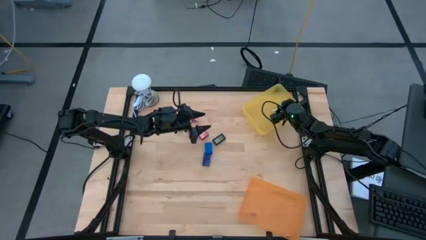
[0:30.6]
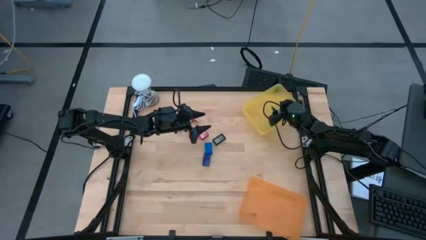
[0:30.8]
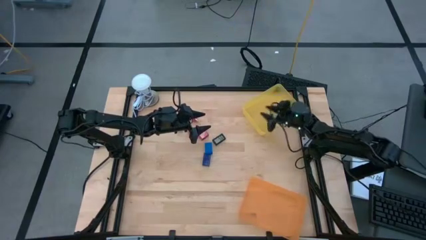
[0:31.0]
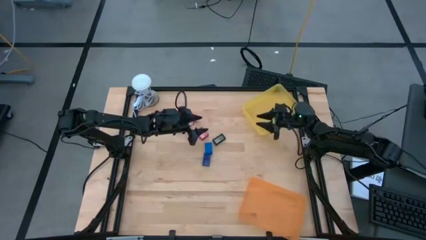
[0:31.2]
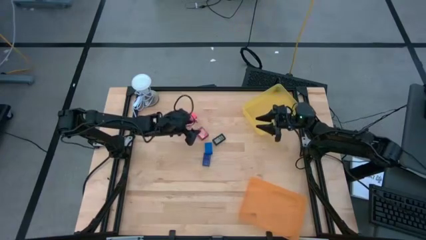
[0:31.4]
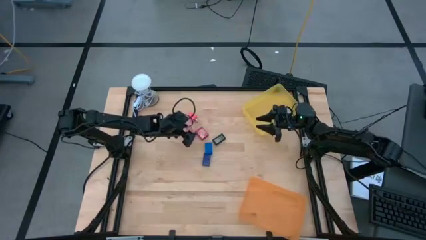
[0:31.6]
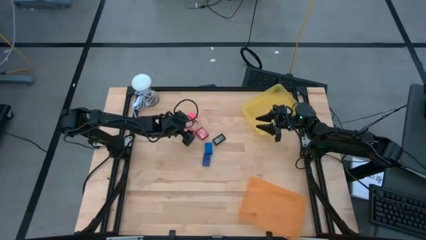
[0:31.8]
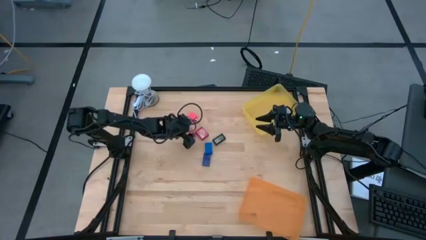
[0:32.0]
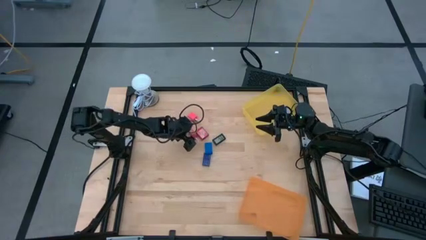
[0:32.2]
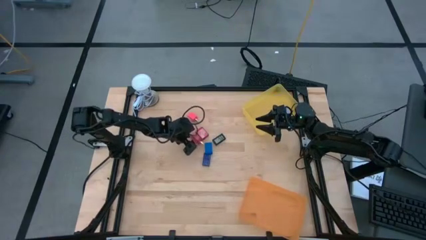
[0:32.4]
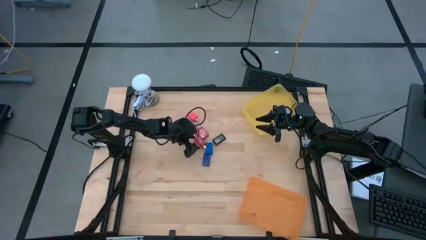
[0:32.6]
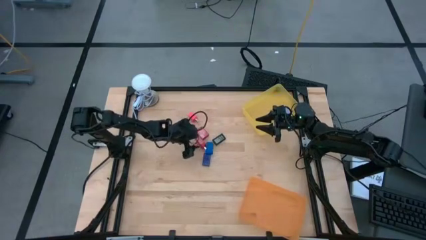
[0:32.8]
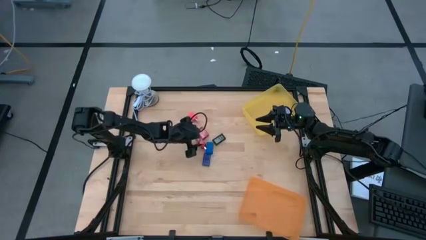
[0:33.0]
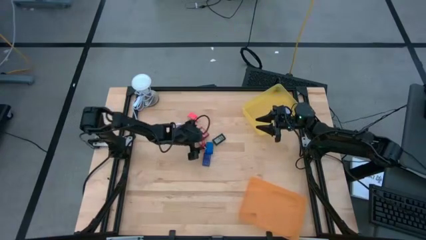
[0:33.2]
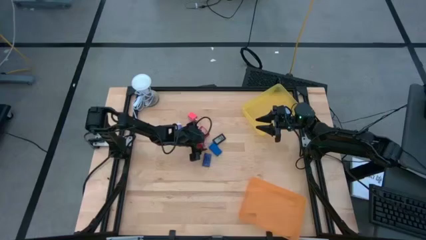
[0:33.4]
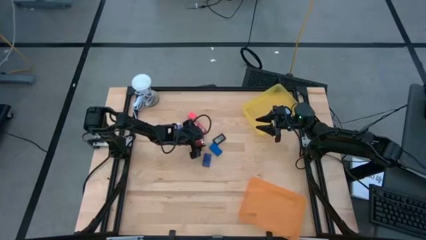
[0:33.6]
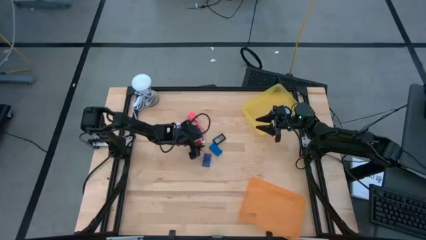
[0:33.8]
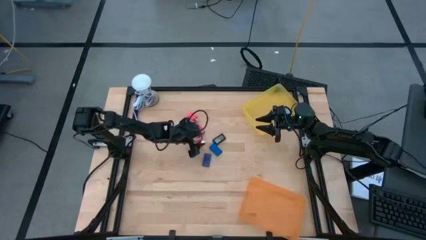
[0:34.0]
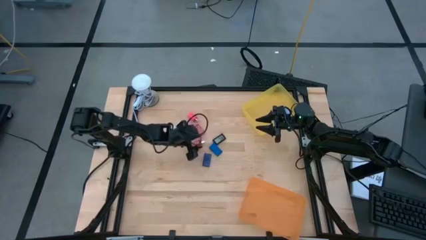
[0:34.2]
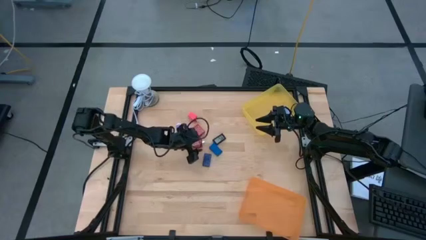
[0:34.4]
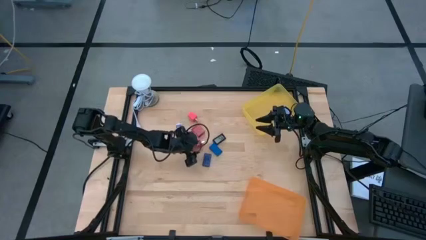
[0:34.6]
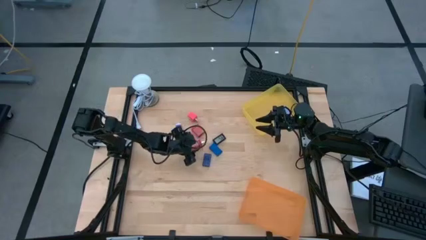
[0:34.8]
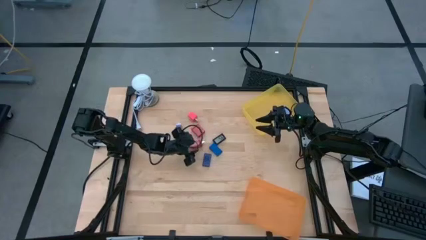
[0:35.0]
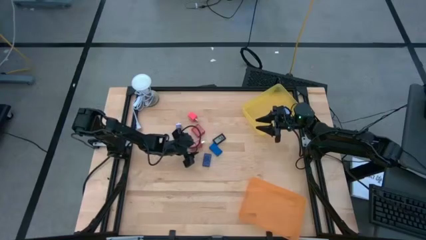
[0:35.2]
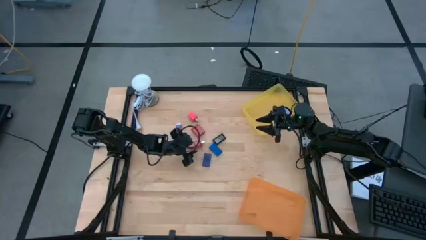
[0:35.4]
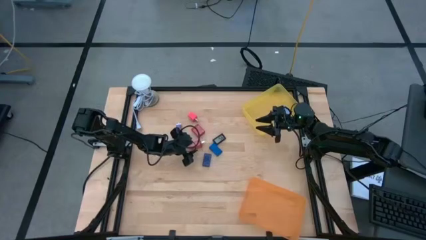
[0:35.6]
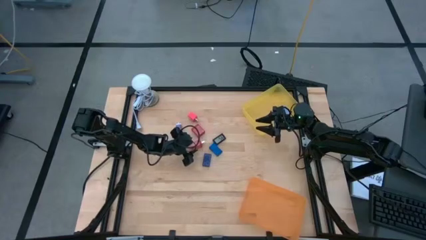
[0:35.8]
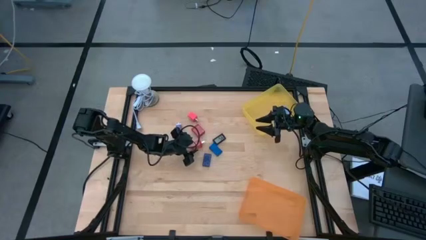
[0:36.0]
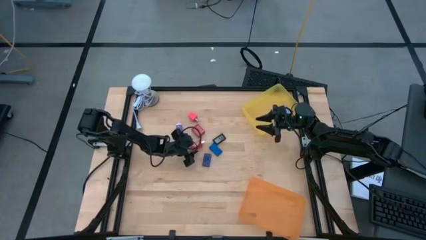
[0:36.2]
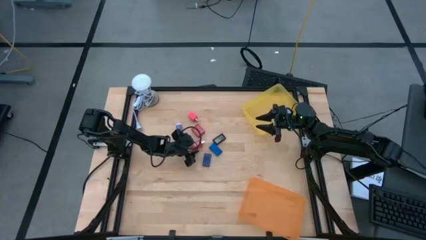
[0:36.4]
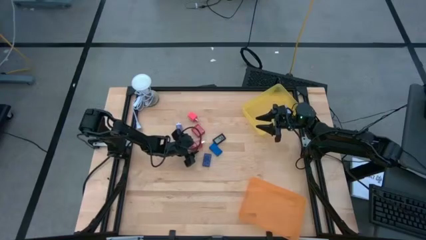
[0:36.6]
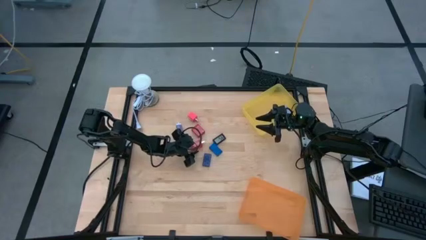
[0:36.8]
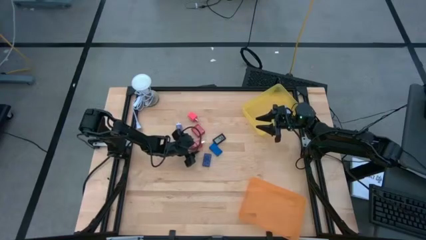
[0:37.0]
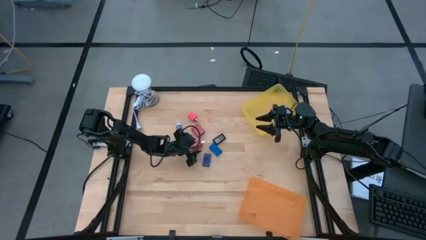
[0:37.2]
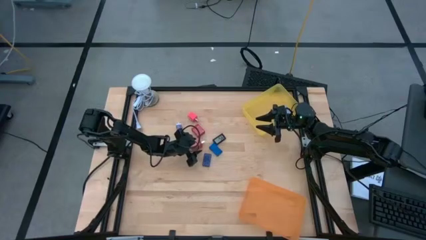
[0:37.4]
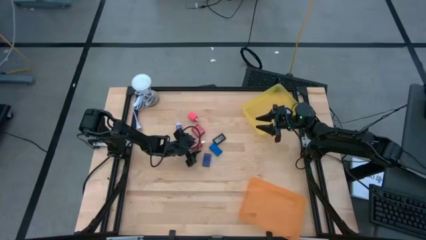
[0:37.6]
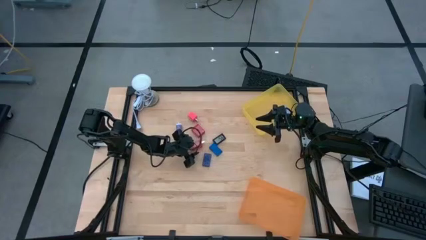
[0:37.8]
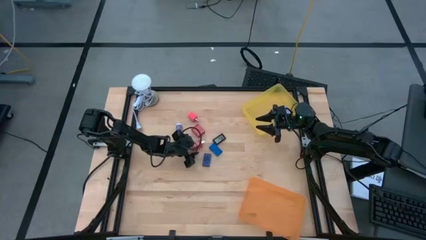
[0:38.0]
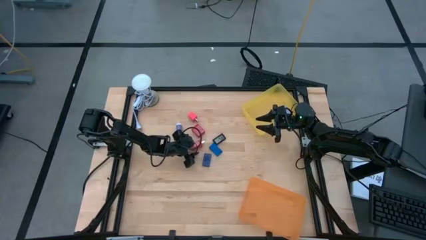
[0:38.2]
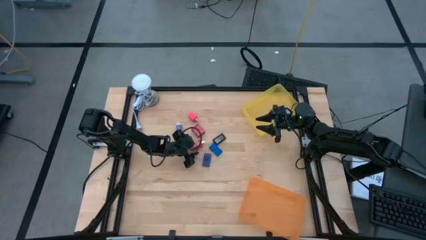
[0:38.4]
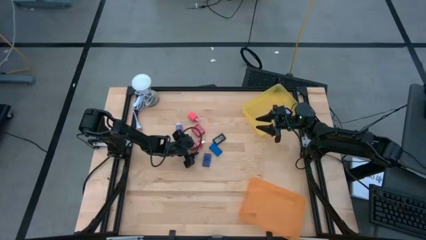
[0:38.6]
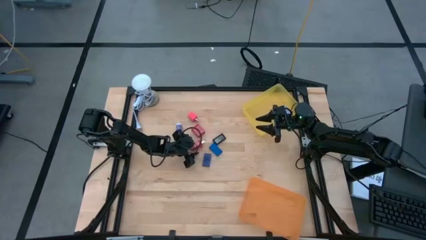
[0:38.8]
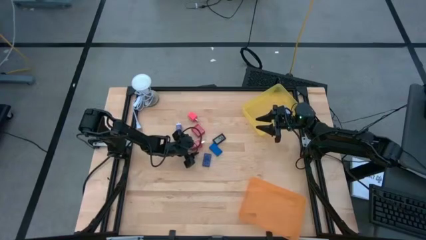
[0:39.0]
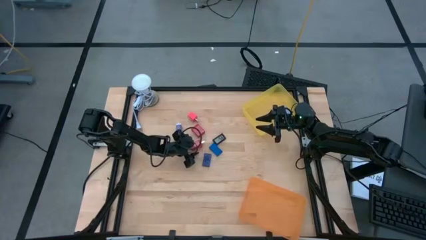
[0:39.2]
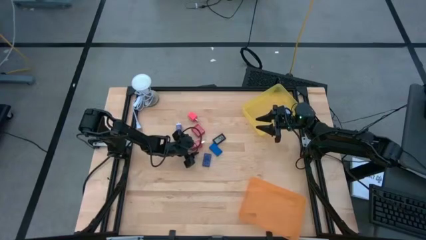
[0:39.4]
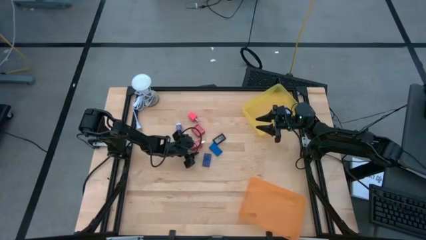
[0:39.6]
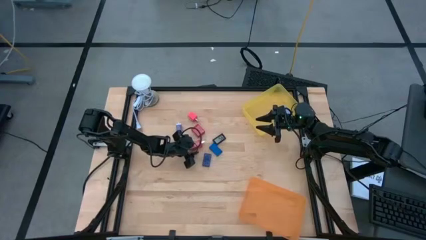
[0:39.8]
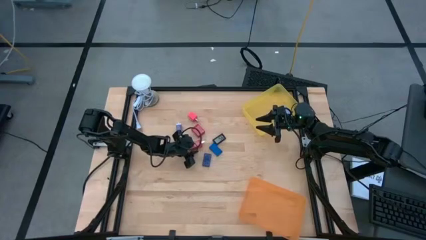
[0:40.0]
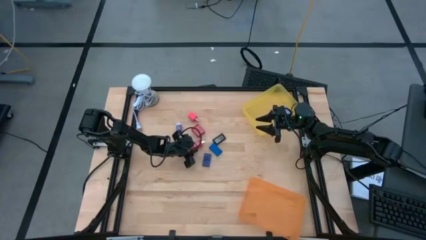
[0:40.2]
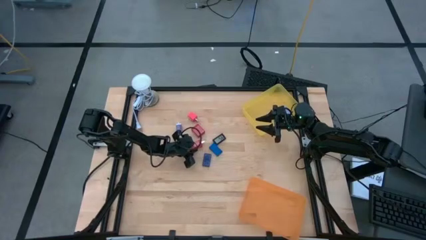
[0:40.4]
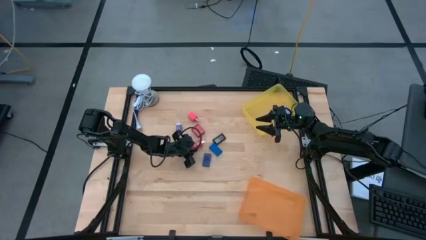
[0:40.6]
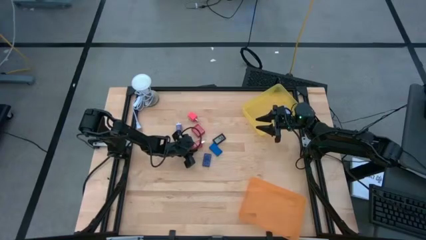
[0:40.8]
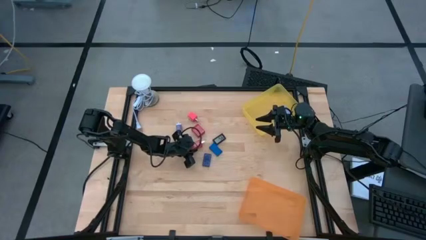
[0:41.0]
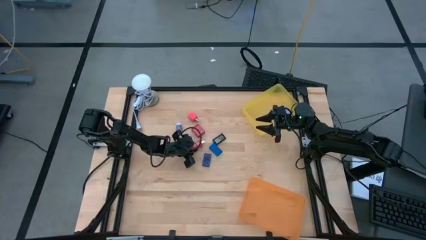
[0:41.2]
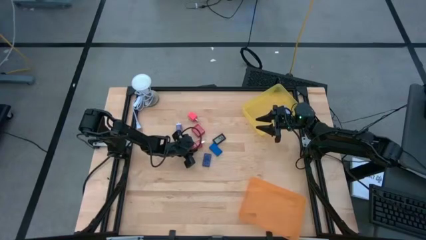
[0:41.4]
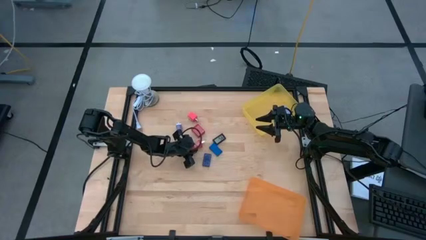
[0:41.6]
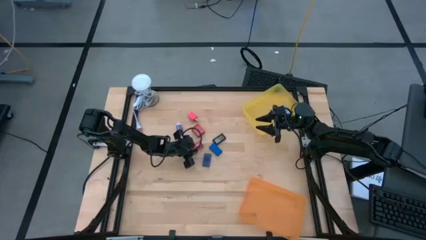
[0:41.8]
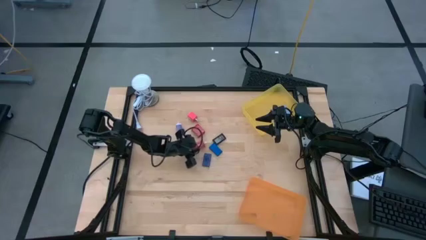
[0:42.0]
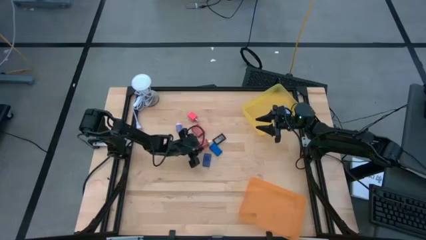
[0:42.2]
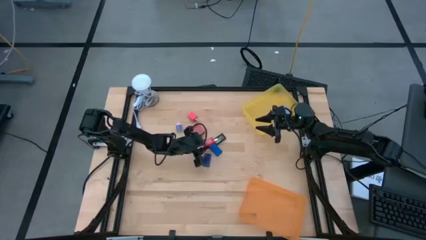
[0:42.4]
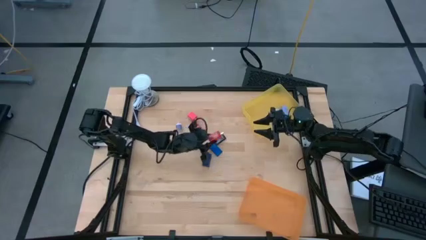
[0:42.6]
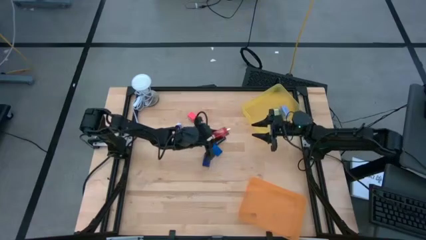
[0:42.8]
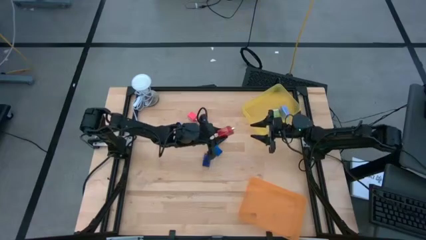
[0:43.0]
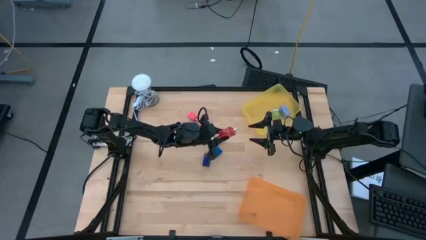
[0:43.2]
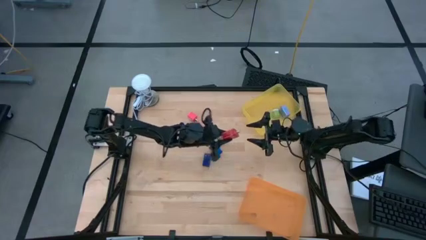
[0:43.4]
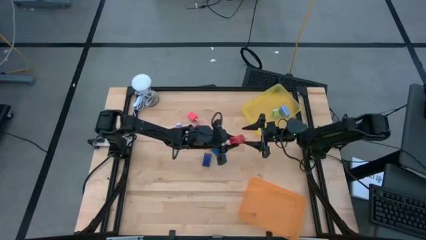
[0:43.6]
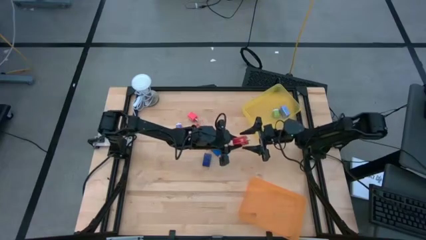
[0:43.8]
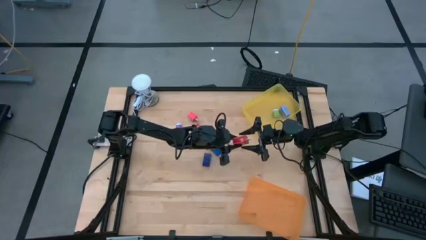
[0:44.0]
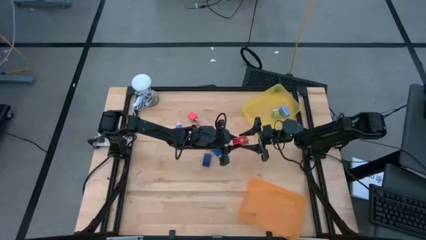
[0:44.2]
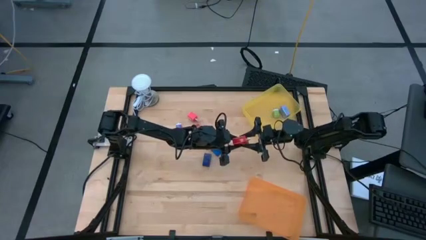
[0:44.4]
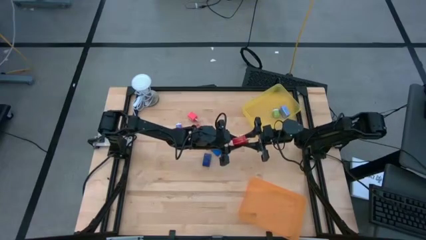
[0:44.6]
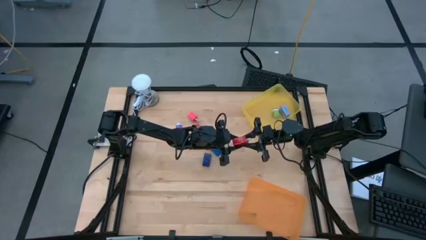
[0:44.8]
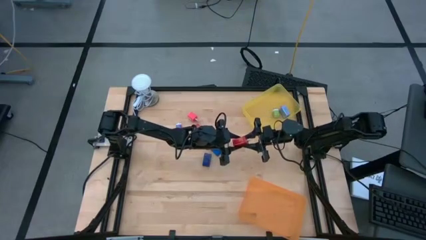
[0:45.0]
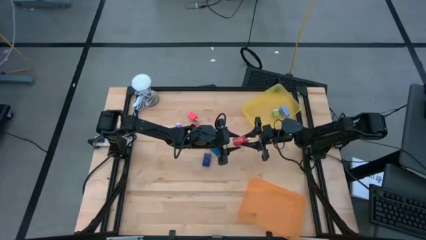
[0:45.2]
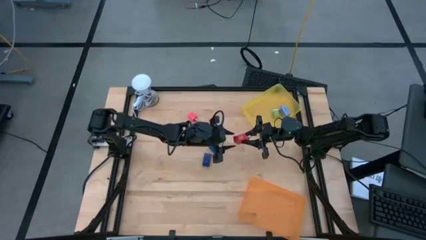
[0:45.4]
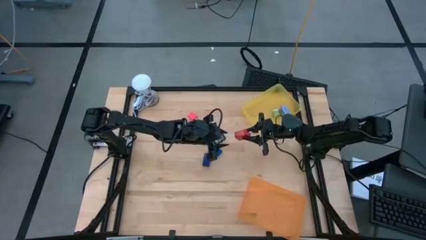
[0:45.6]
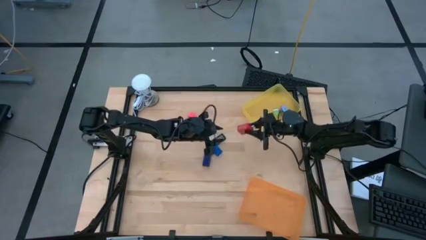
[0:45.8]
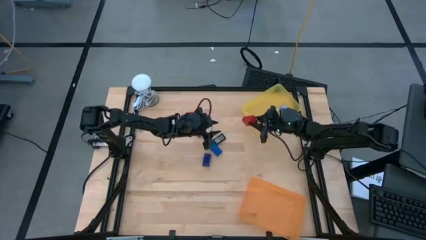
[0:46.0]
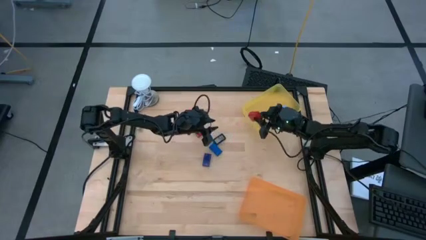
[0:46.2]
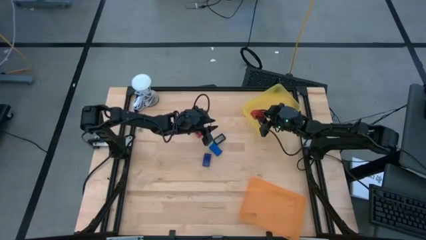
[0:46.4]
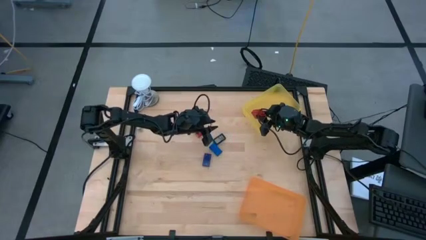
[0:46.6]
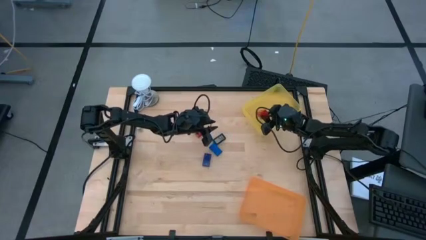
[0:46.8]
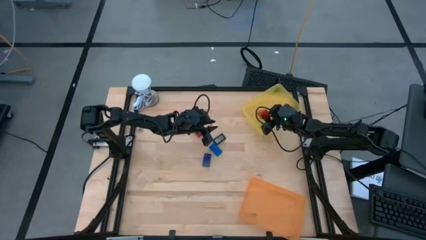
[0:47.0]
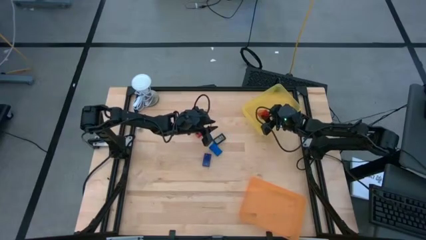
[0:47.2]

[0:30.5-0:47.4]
Task: Pick & Place Office items
Put the bottom red charger adapter into the yellow bin
